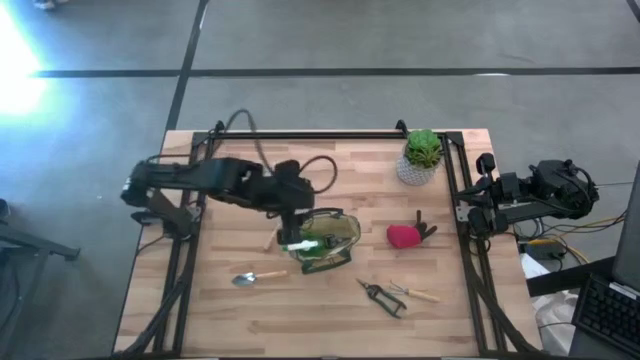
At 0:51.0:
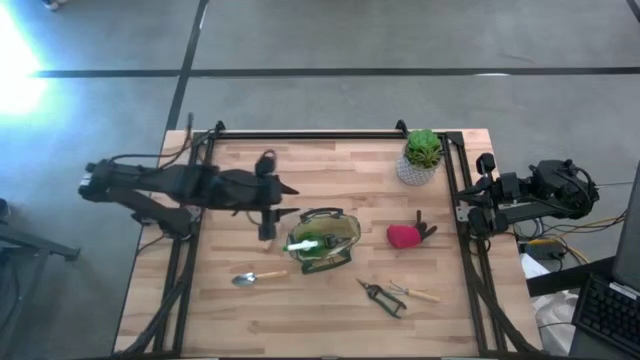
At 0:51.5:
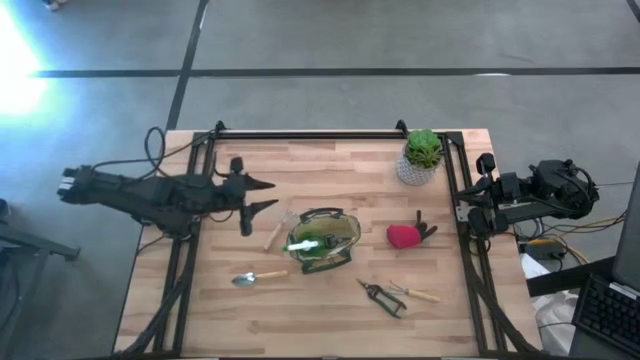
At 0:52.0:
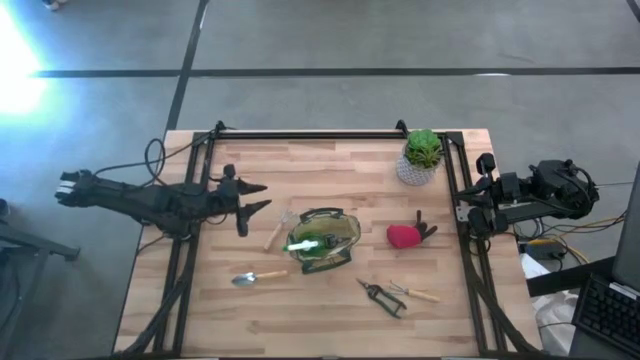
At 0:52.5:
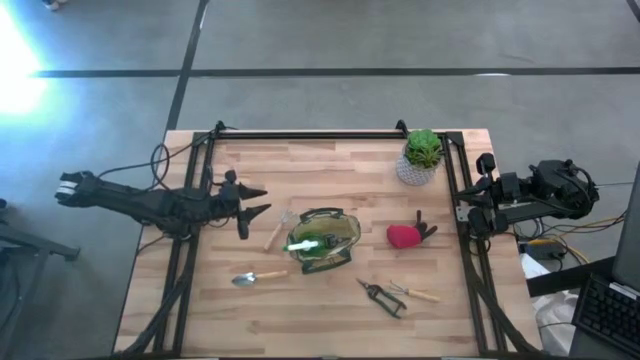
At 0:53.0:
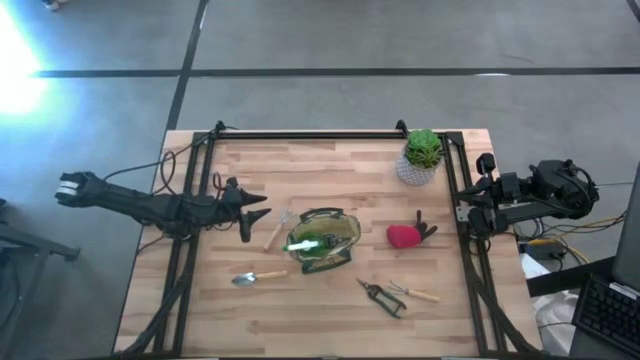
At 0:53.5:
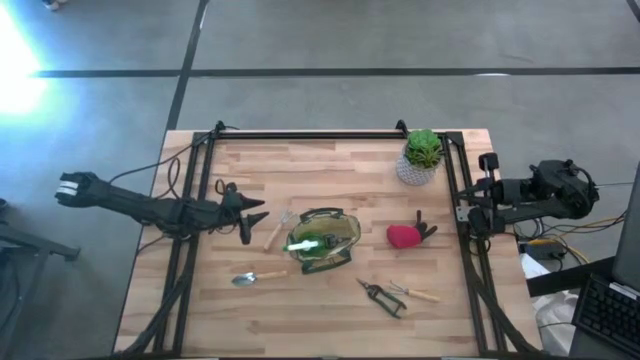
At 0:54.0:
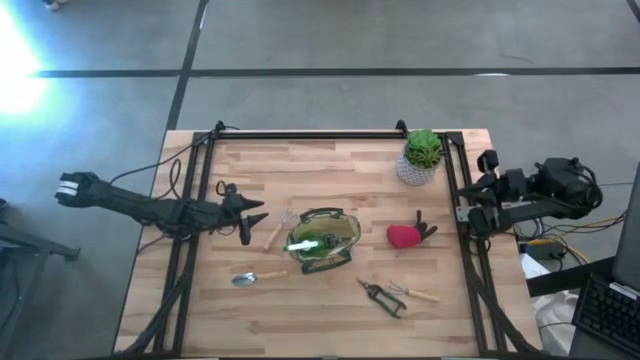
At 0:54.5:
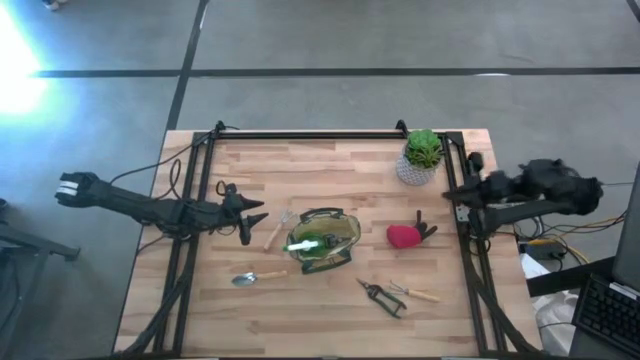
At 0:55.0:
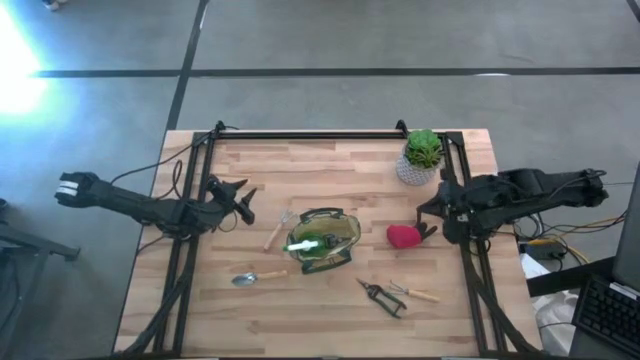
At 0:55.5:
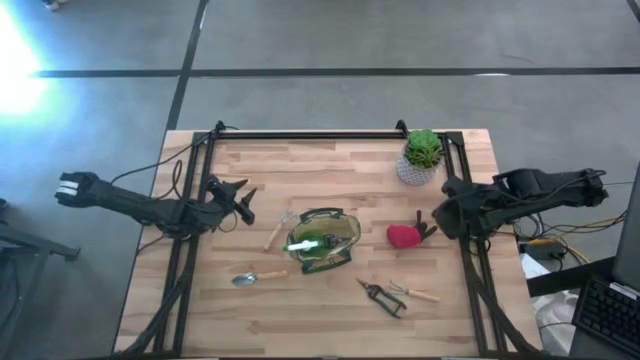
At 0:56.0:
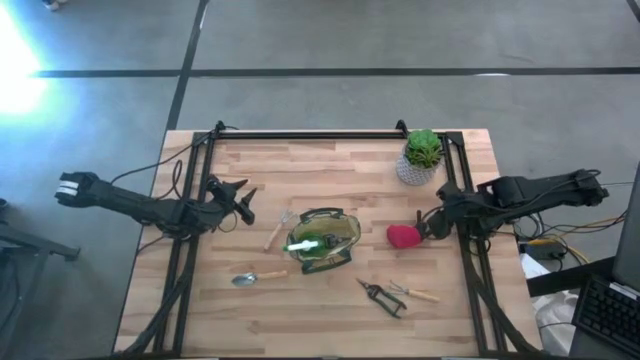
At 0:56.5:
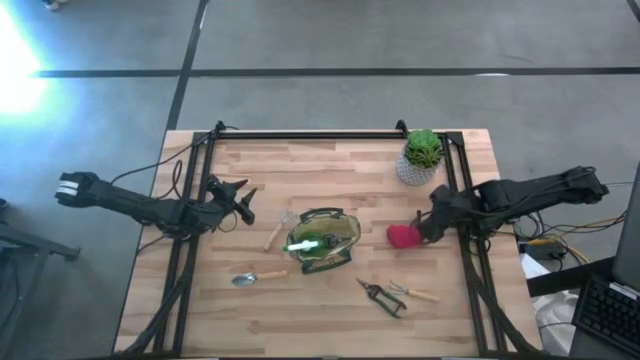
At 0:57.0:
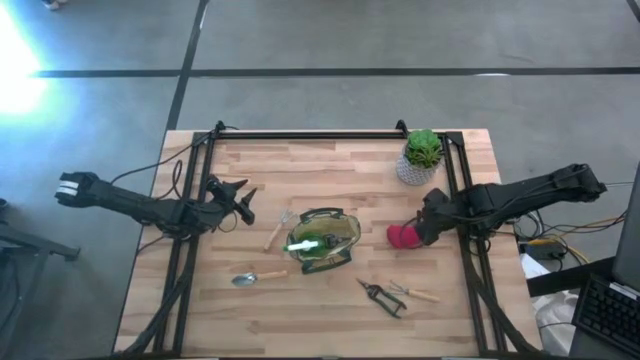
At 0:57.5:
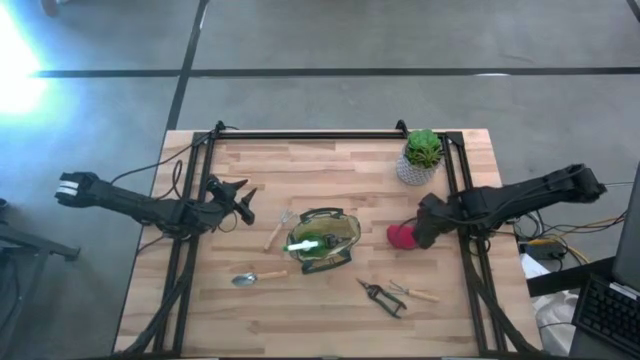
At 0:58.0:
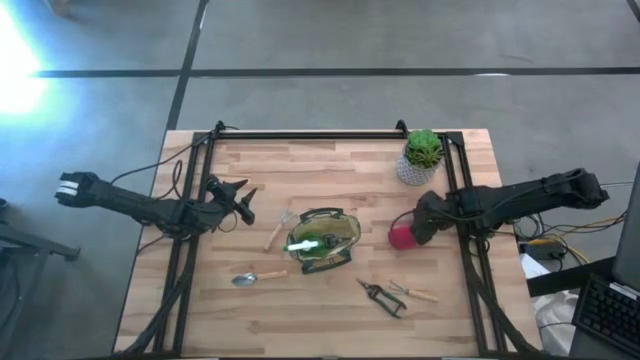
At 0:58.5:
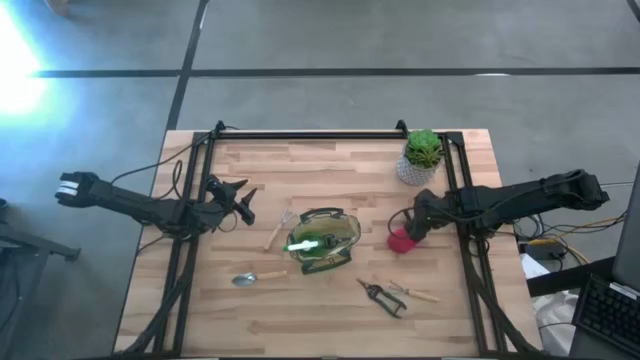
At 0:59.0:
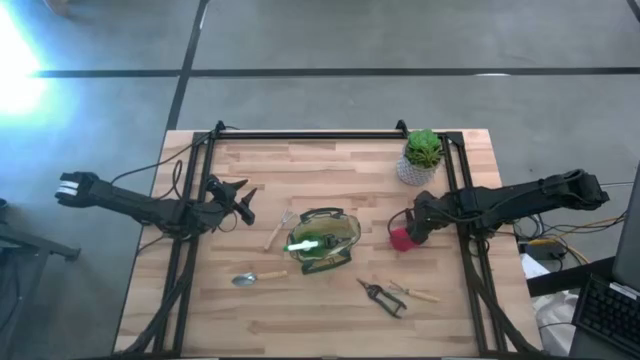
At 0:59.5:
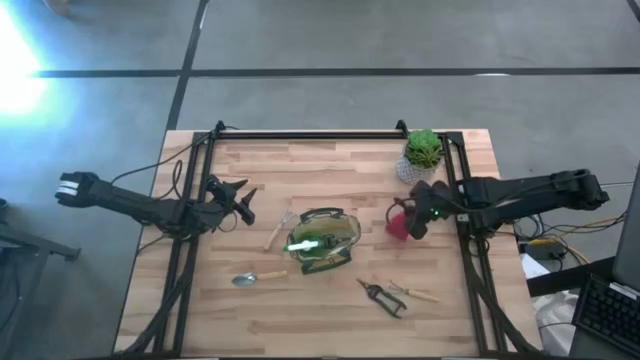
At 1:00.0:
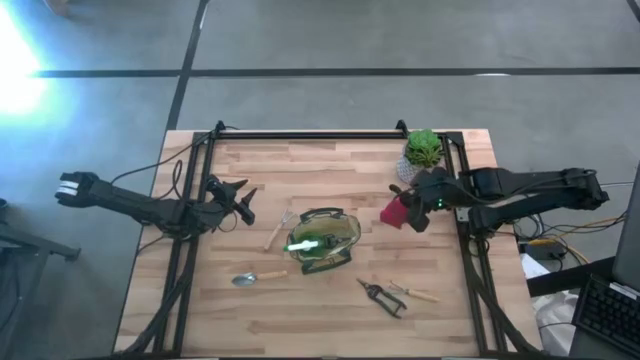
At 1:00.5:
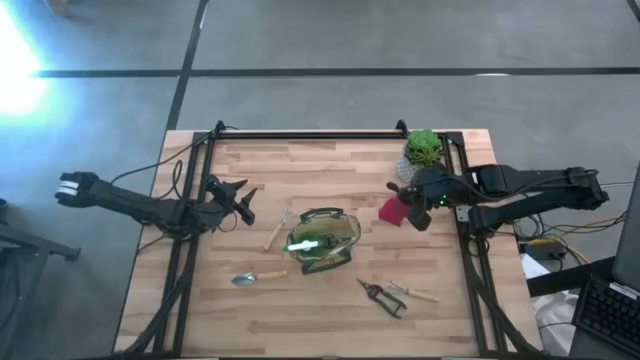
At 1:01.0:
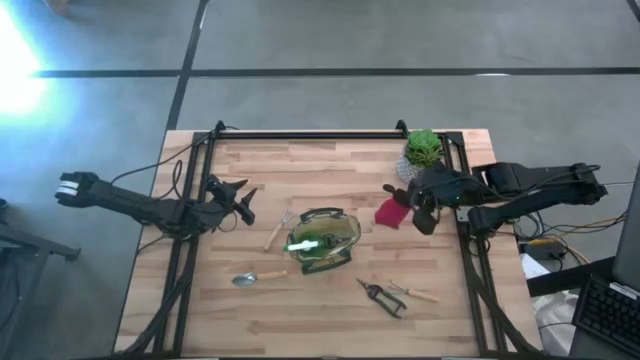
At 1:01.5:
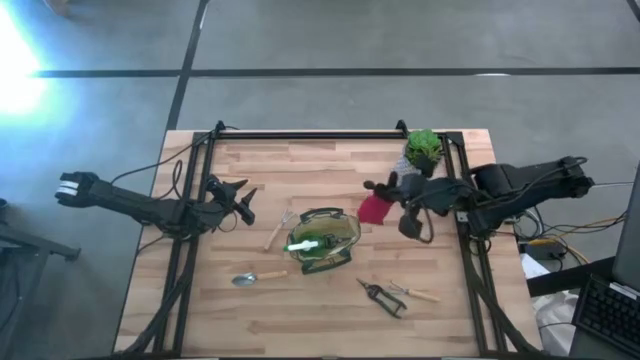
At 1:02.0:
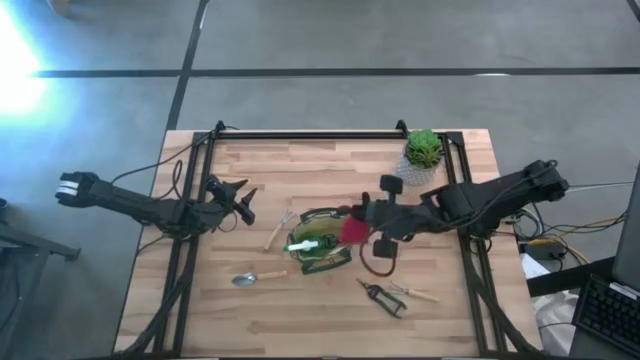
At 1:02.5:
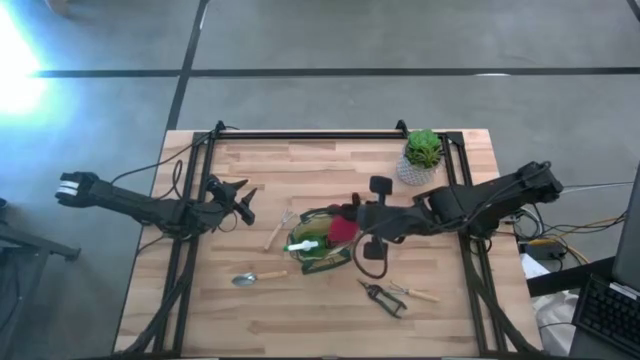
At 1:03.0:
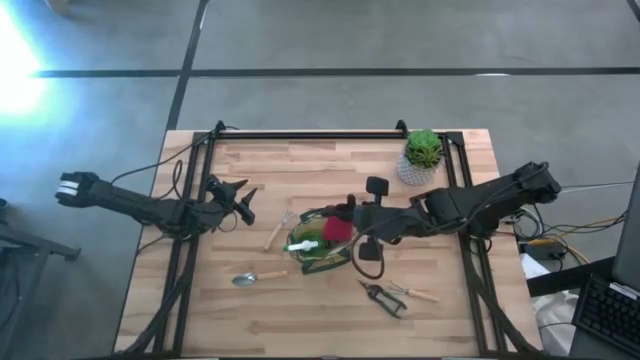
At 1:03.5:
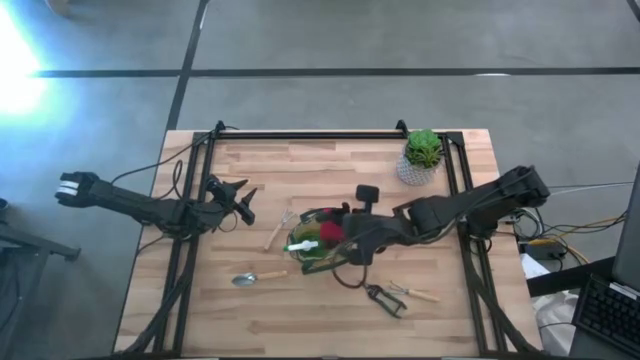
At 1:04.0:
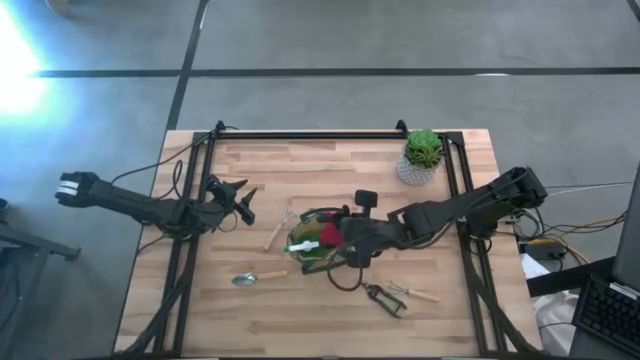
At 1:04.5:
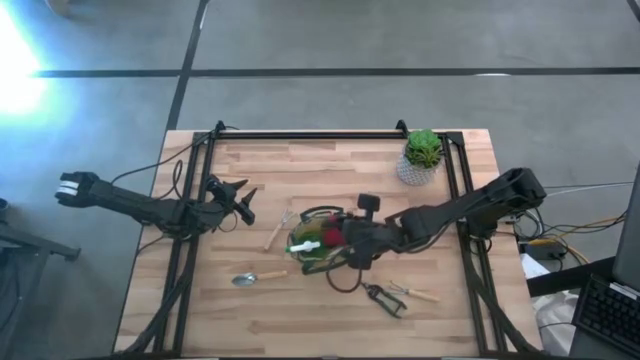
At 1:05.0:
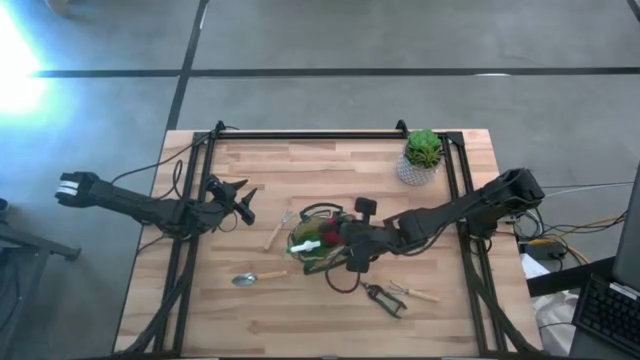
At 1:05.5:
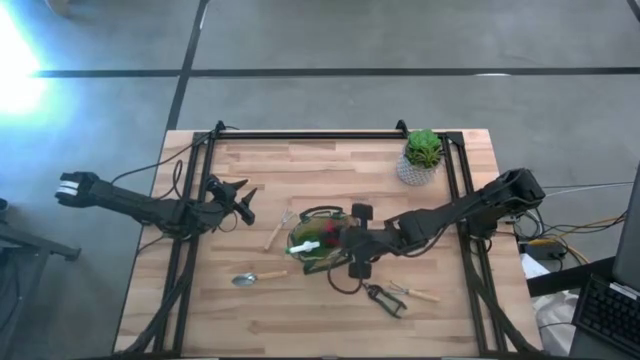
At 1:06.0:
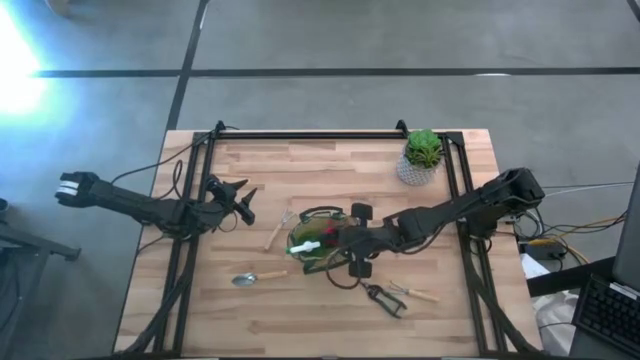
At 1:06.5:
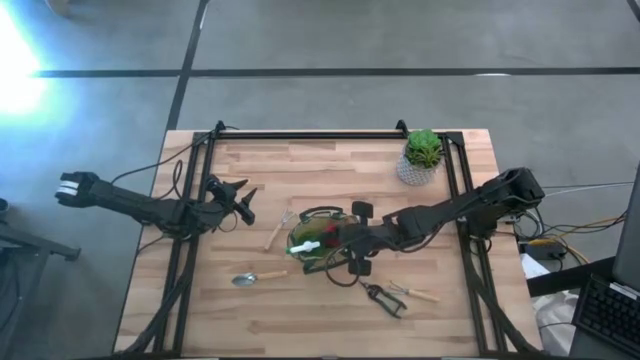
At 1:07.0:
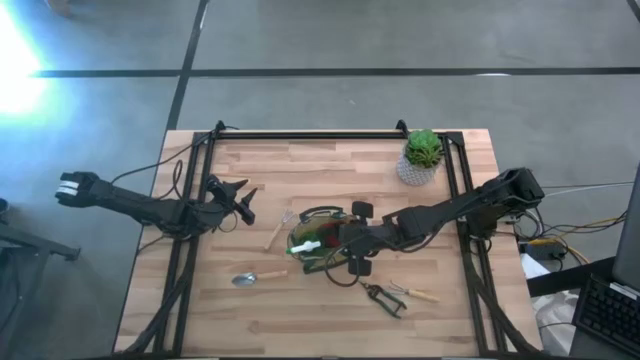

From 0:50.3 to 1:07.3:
Task: Pick & Place Garden tools in Gardening bag
Put the red glove into the green gardening bag

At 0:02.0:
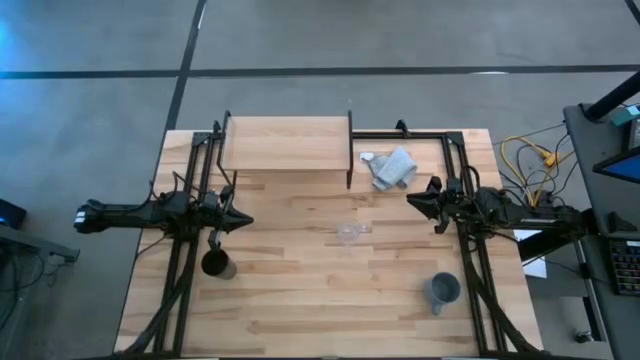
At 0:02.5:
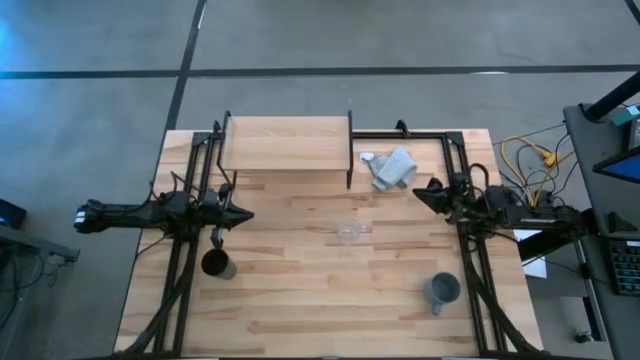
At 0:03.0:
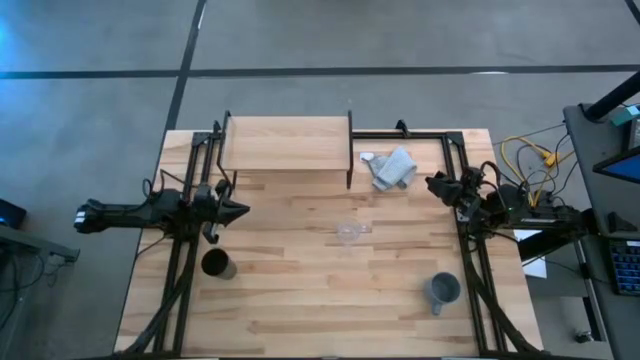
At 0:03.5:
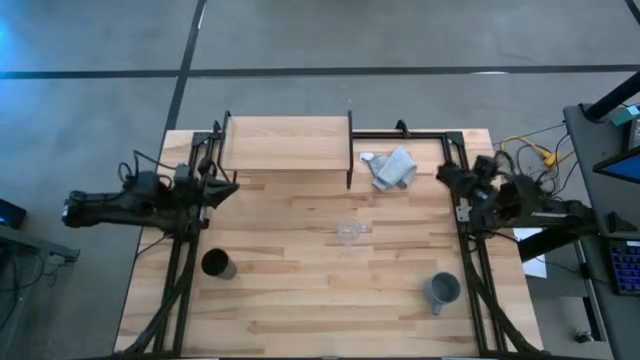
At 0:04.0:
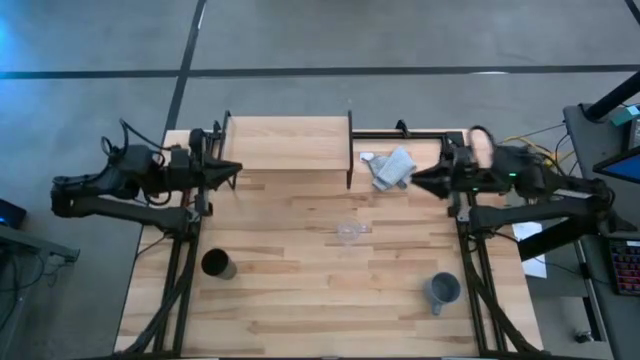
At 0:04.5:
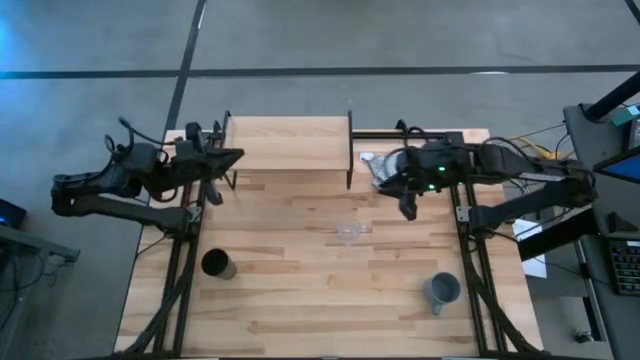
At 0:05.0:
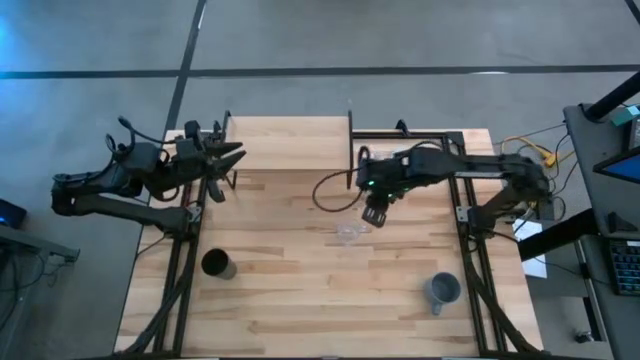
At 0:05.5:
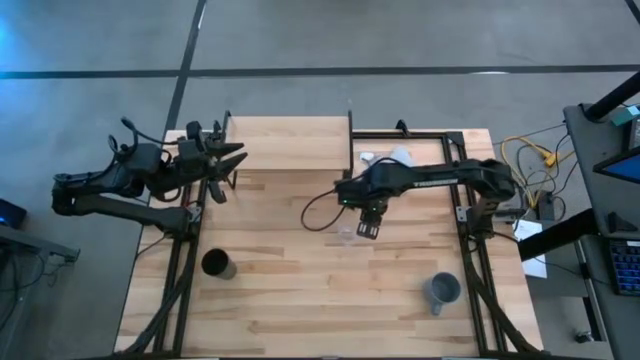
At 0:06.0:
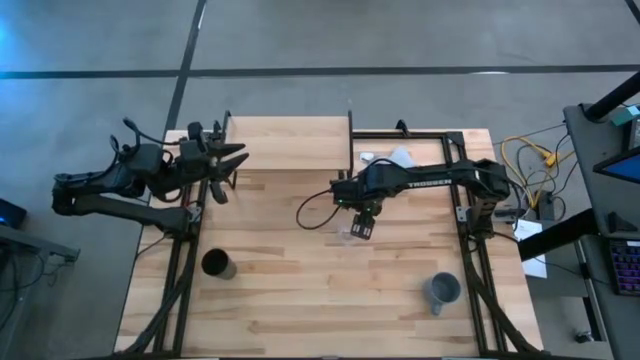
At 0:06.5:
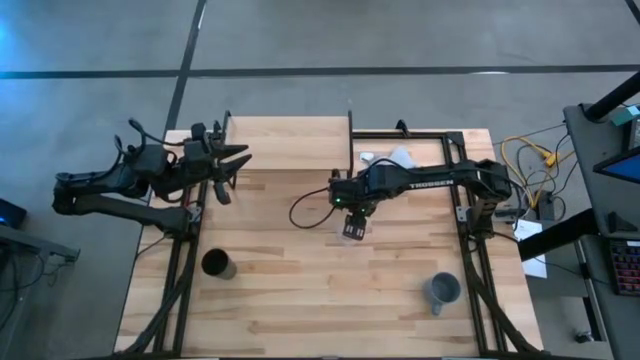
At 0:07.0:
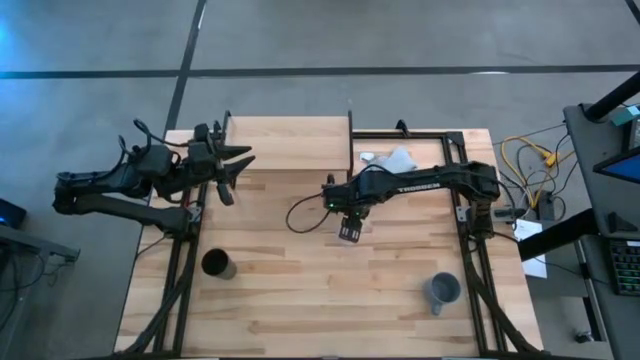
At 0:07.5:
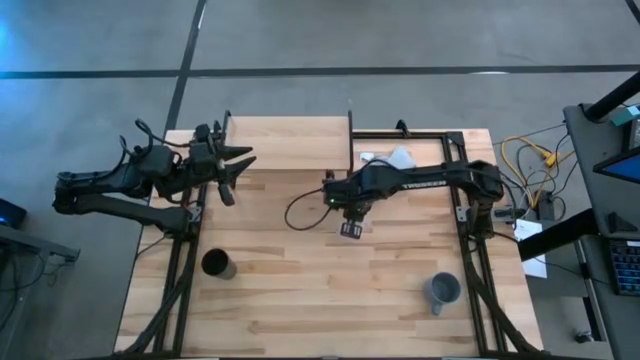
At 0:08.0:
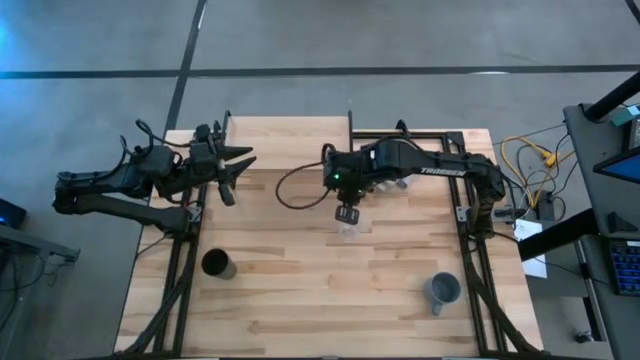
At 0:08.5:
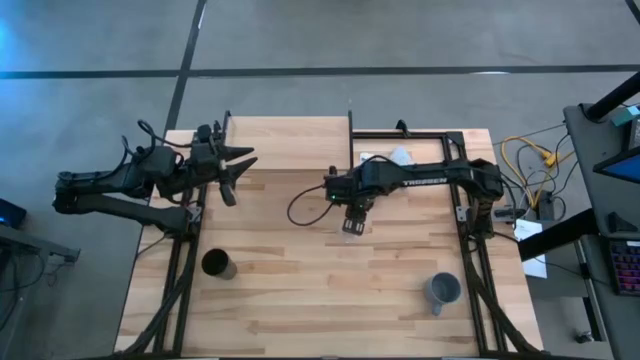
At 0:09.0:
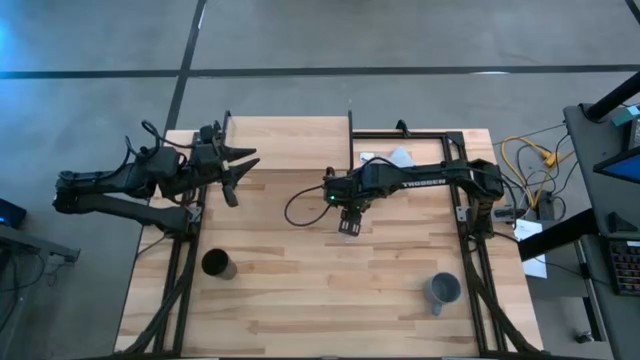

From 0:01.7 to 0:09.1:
Task: Stack small to large cups/mugs on shelf
Put the transparent mug on the shelf
